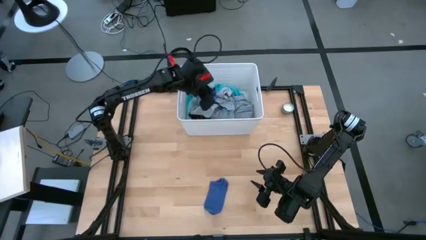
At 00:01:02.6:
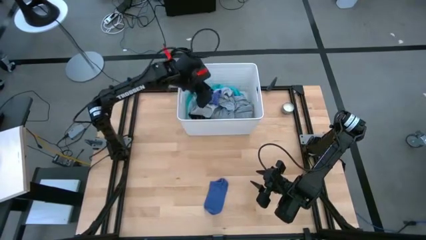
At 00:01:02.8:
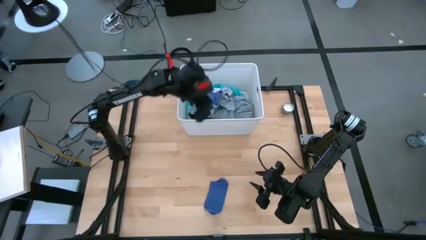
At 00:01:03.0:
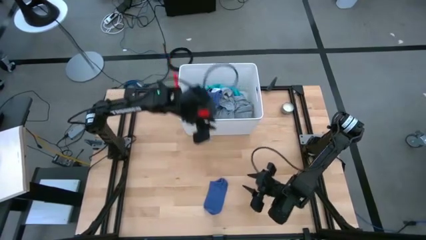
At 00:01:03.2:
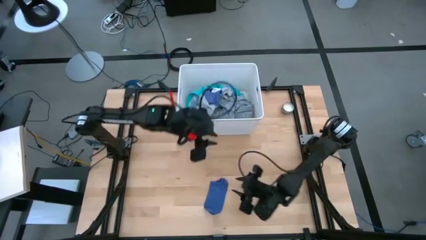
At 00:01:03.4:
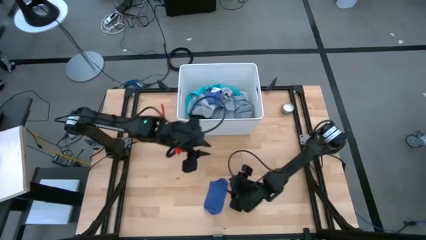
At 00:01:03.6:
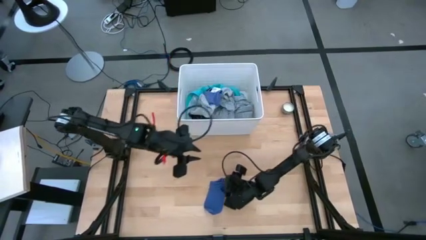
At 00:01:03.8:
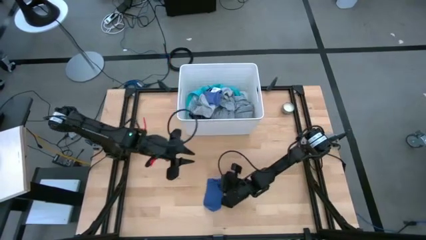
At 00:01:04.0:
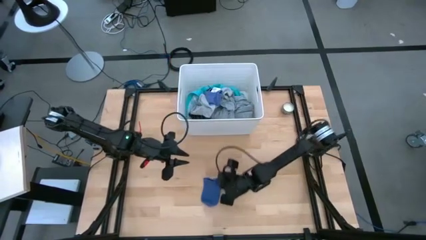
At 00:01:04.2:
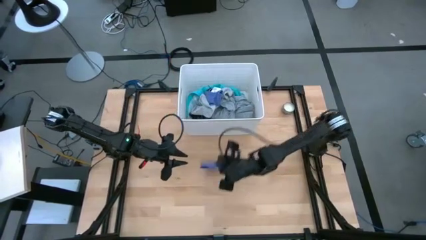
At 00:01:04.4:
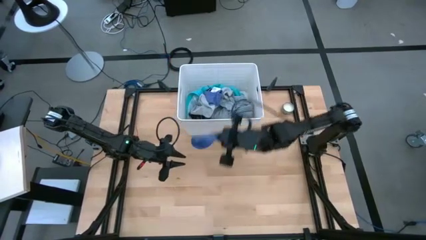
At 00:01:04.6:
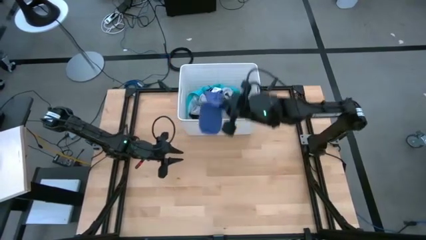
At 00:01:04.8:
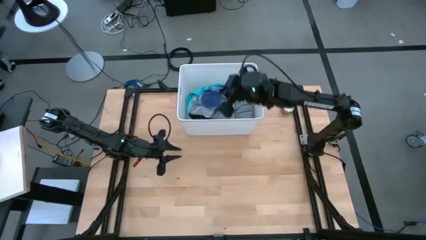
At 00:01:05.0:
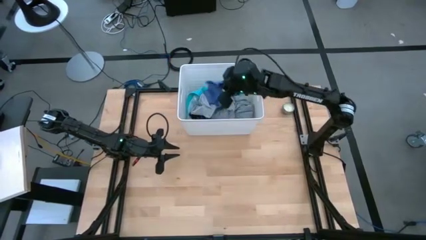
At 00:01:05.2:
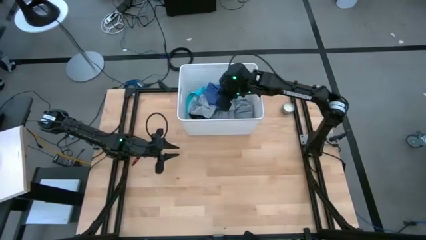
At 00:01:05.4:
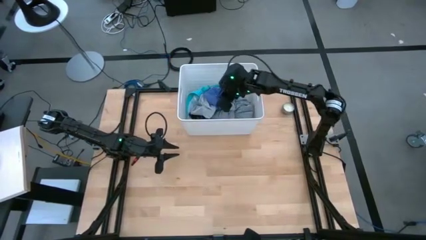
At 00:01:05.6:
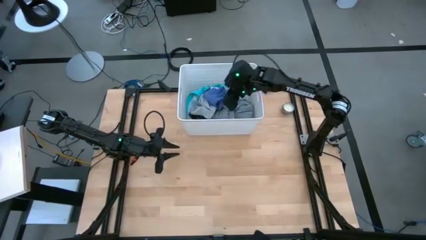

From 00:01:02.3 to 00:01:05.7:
Task: Sort clothes
Put the blue sock into the white laundry bin

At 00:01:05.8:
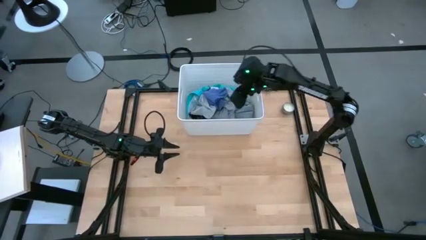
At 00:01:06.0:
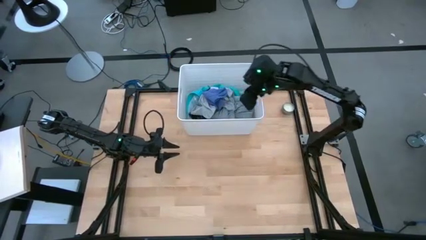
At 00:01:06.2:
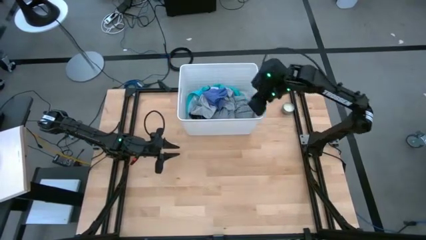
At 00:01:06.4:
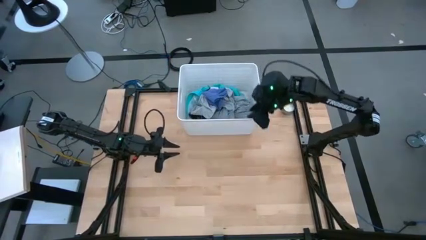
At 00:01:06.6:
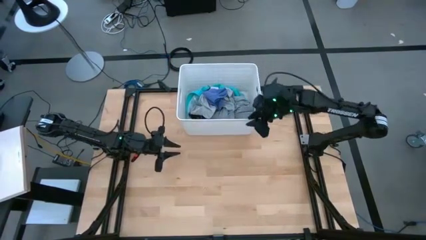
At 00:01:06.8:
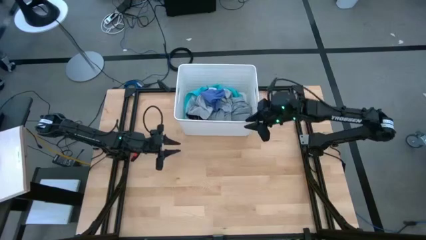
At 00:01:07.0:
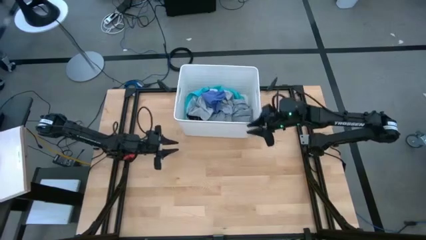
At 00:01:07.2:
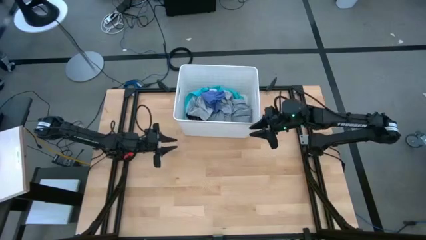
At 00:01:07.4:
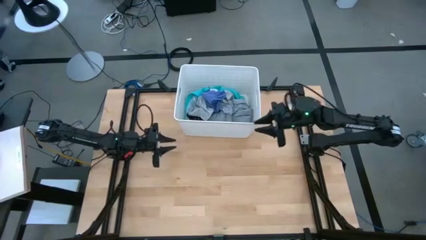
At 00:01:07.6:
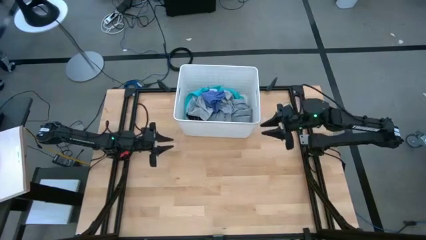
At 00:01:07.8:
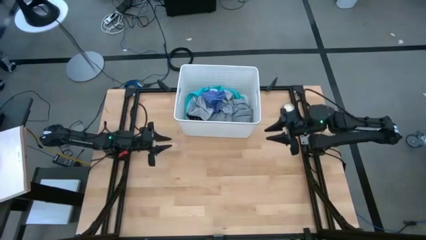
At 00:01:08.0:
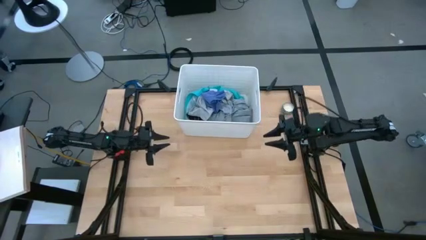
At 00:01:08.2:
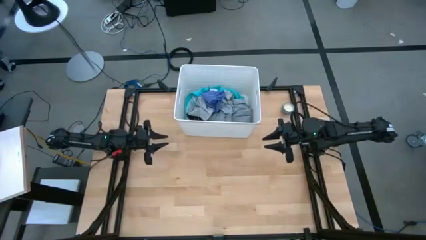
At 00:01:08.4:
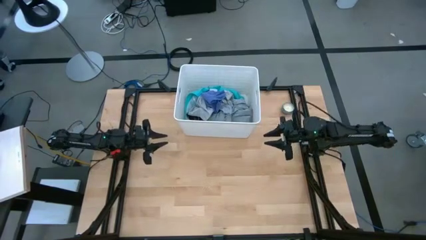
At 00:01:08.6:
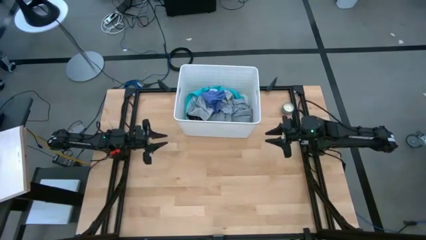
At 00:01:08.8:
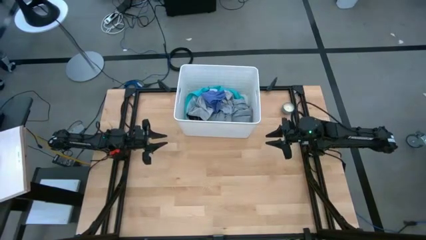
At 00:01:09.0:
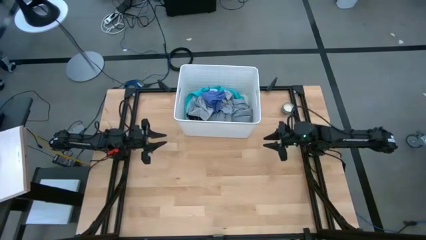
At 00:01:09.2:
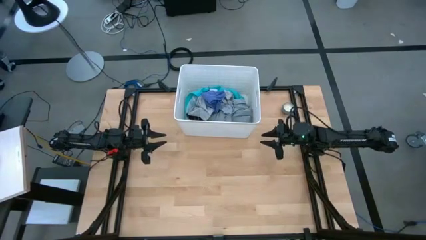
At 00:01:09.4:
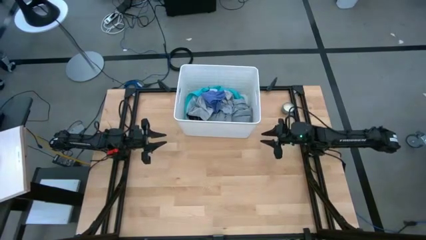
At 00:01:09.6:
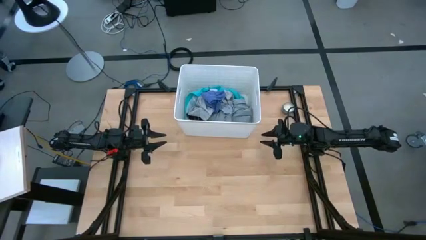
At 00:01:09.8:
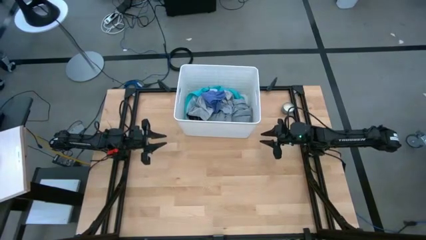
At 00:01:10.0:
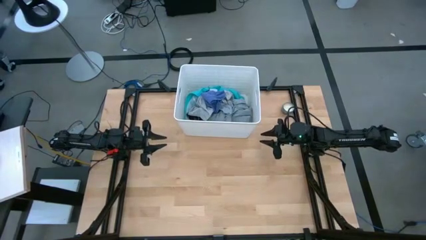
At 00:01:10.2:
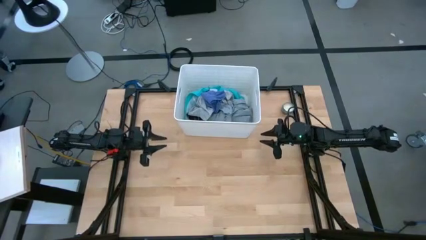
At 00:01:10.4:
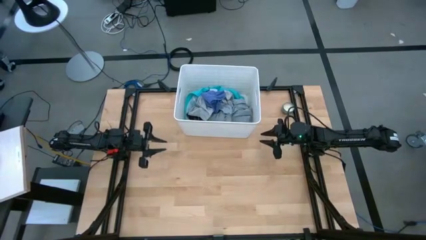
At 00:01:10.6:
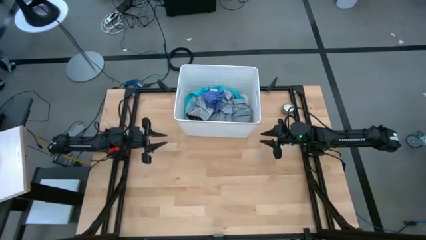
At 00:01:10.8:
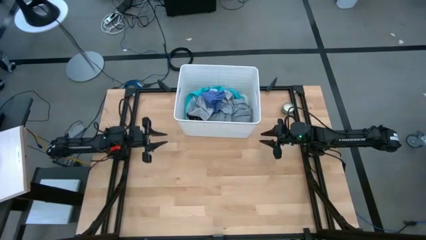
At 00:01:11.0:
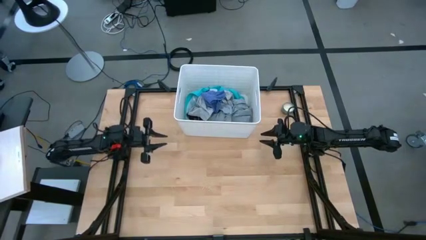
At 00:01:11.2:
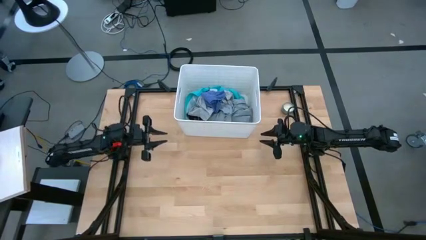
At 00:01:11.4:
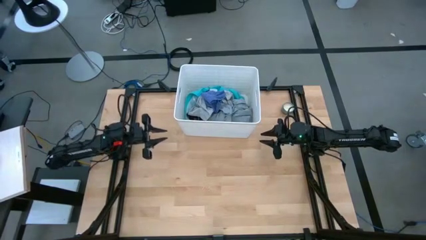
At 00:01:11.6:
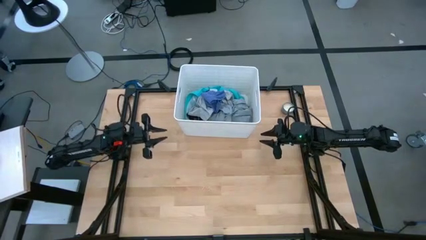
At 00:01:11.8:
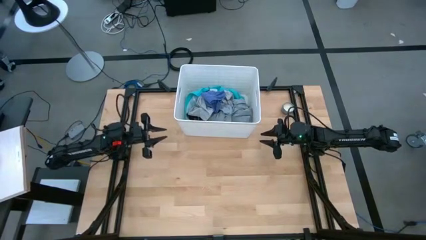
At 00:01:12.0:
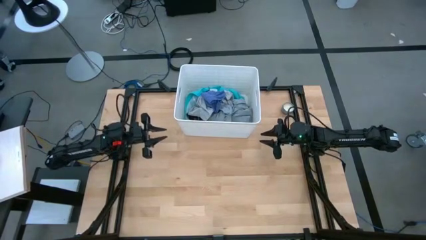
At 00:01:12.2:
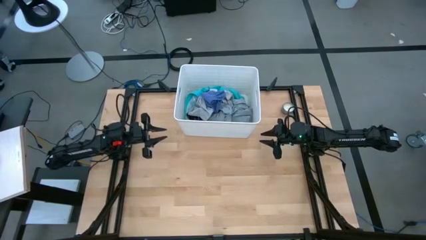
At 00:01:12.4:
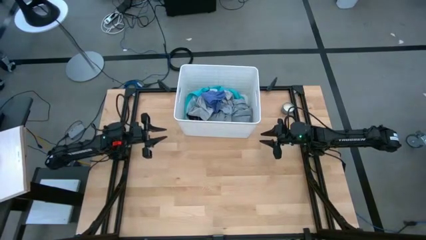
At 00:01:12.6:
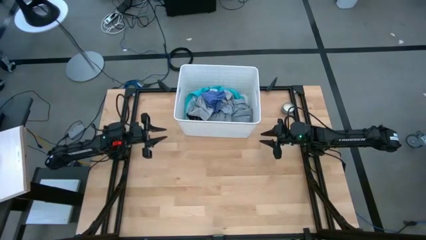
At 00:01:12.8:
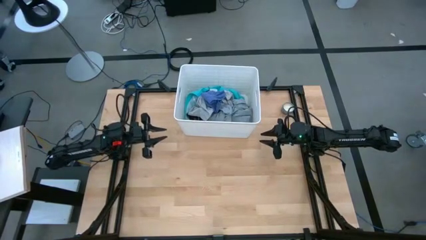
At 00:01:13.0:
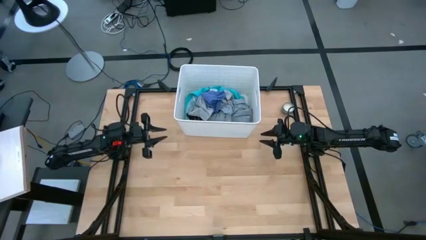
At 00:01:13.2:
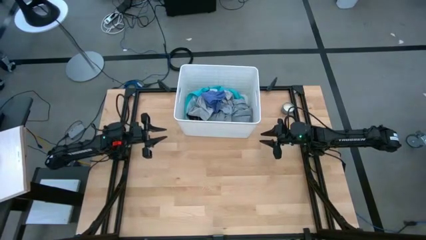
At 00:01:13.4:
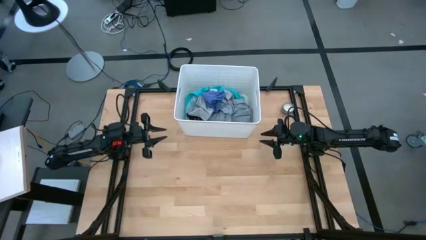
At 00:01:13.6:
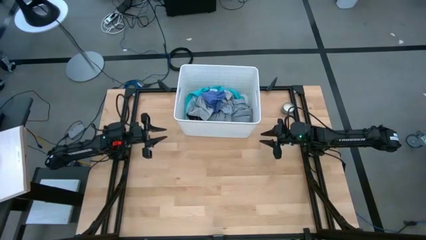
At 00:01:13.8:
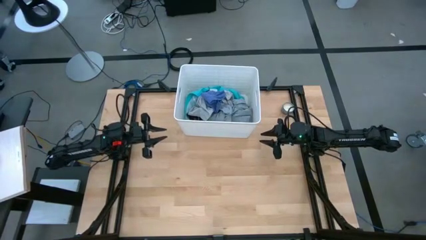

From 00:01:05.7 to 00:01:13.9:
Return to Home Position

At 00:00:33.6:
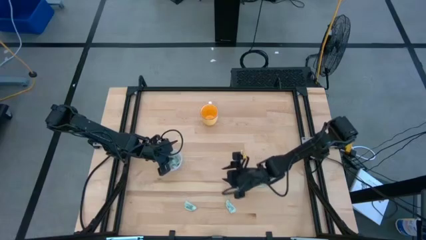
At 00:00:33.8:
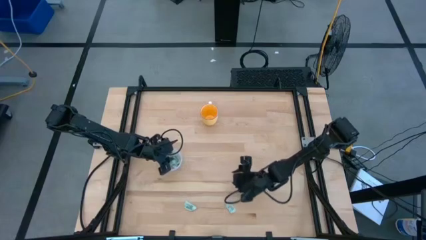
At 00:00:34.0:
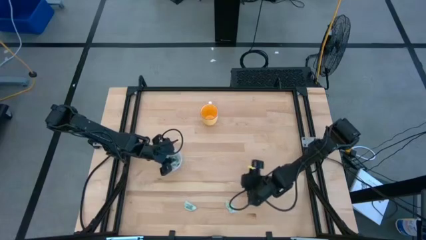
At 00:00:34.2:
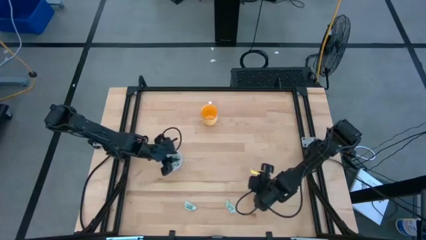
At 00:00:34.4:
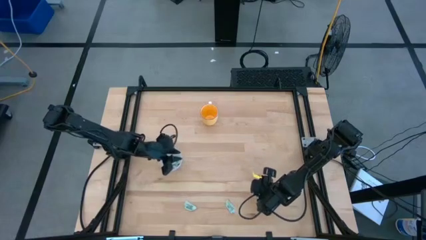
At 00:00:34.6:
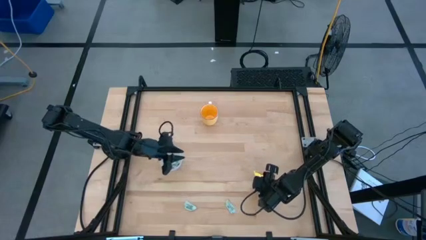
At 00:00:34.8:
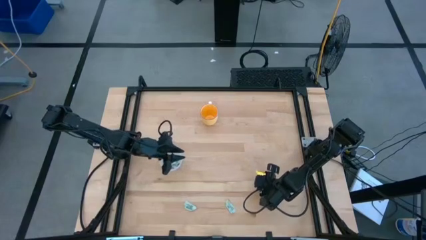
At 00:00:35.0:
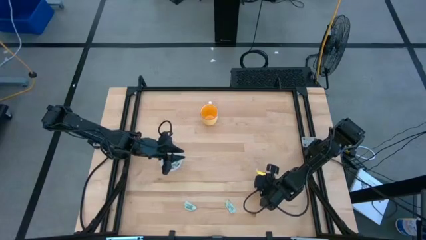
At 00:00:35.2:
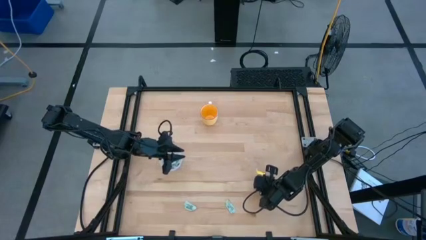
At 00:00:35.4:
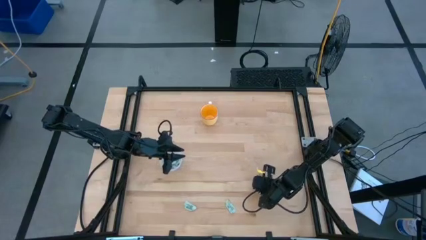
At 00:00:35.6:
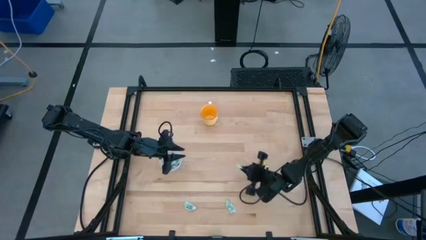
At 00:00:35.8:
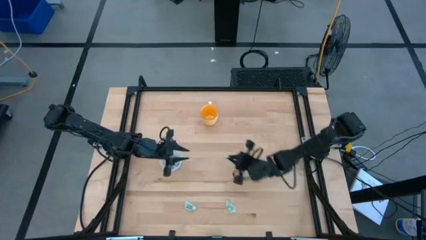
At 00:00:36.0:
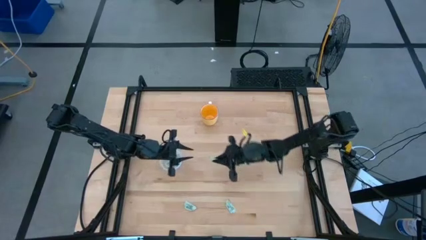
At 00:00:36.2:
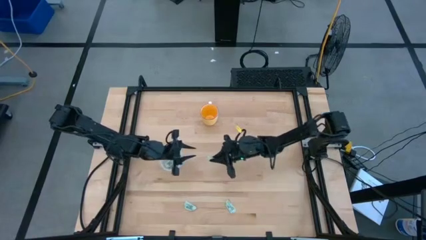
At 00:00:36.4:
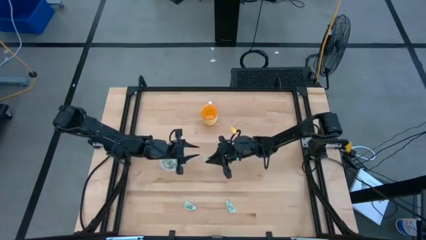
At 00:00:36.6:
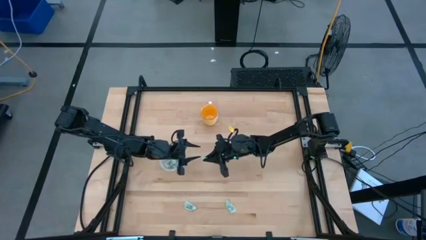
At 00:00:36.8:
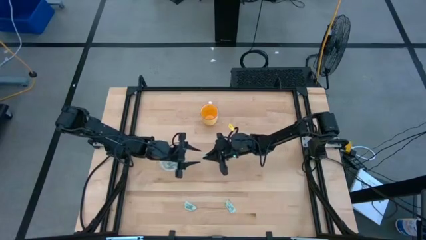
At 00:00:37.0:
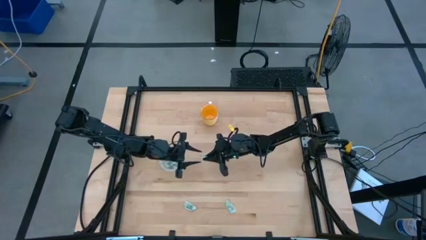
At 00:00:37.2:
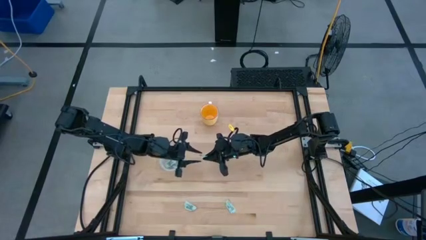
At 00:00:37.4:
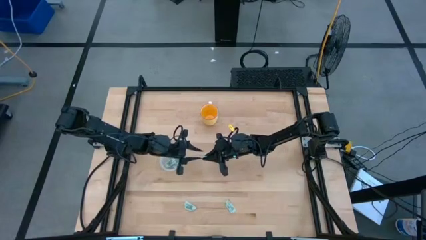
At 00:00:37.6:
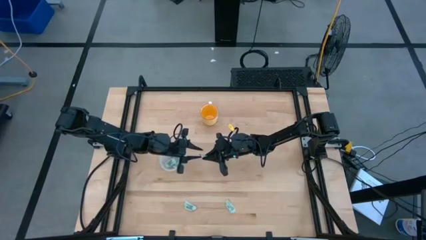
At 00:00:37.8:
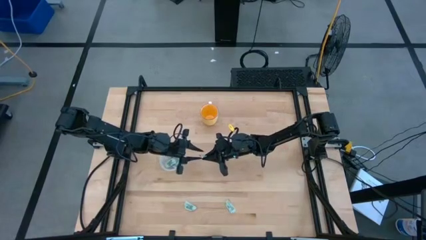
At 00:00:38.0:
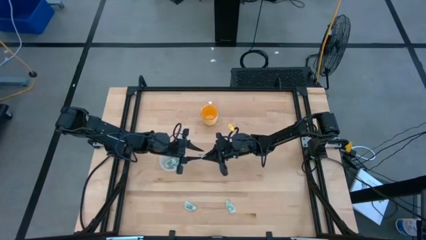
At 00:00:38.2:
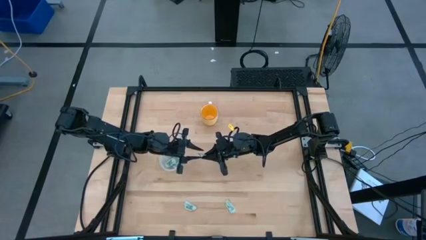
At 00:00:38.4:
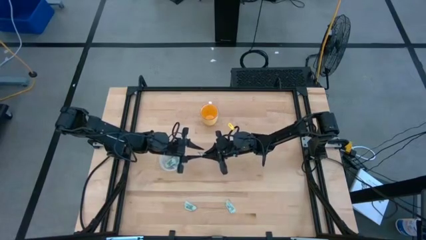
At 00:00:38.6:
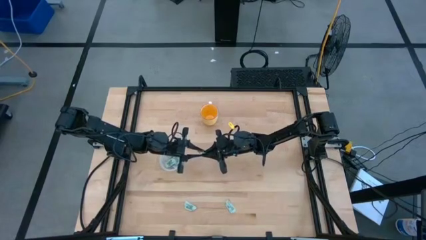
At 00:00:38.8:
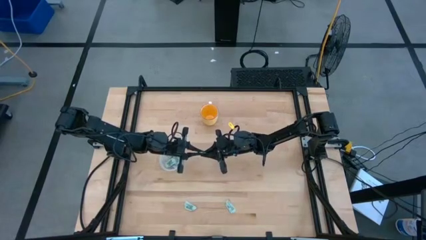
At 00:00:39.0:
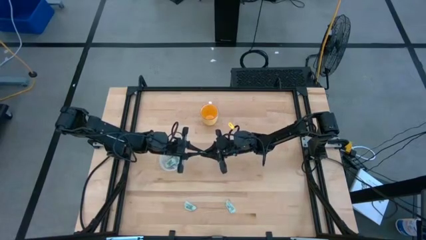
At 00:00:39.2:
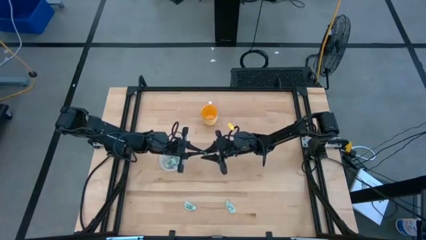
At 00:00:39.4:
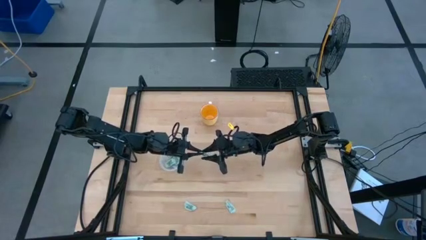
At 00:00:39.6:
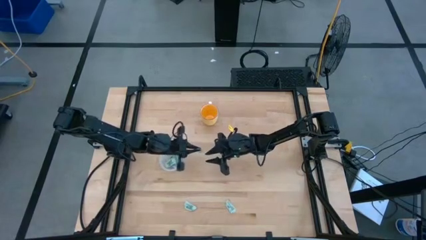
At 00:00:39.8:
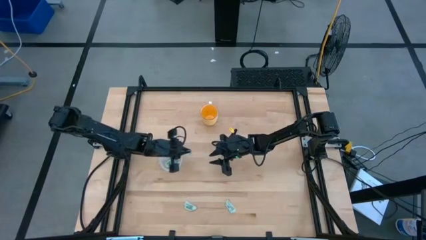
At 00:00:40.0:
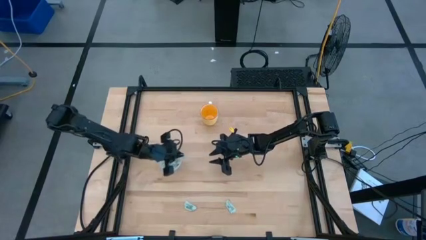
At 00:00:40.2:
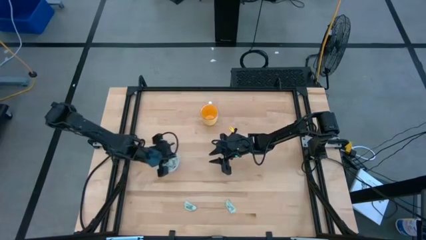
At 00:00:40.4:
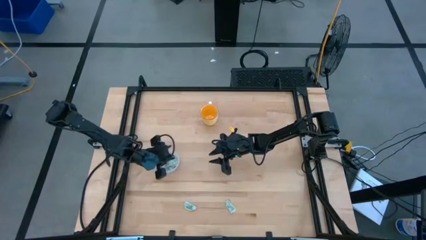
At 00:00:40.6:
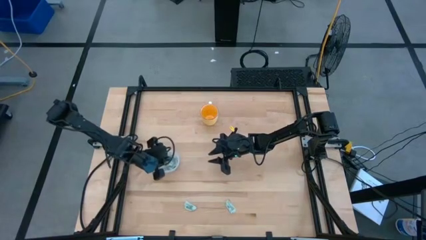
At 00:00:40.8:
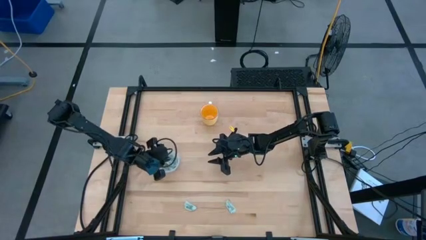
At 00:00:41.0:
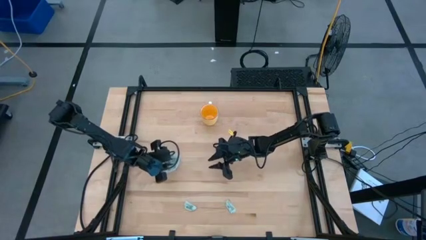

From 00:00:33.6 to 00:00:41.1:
Task: Pick and place Stevia / Truvia into bins
Put the right stevia packet into the container
